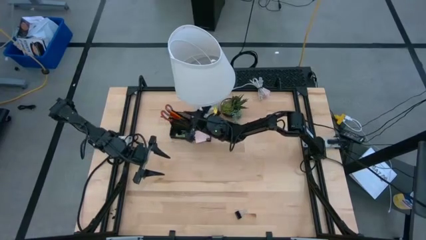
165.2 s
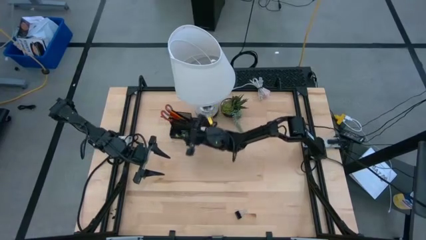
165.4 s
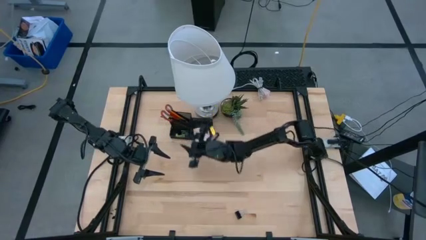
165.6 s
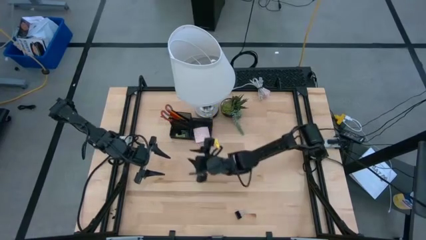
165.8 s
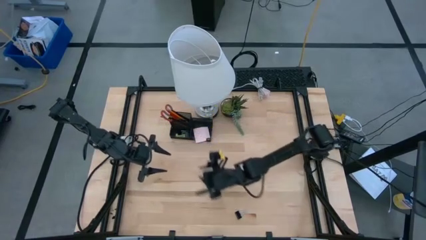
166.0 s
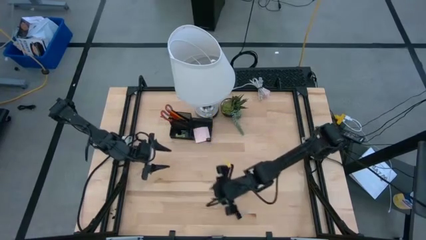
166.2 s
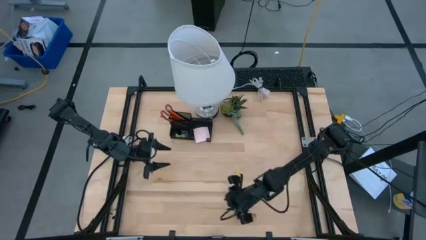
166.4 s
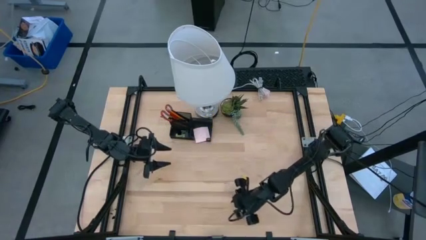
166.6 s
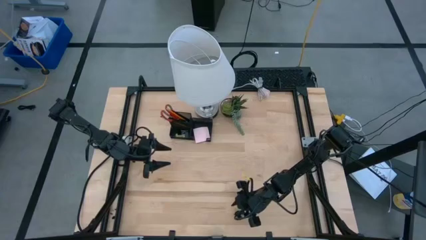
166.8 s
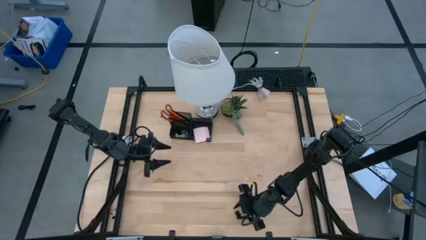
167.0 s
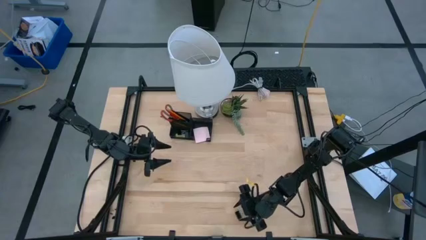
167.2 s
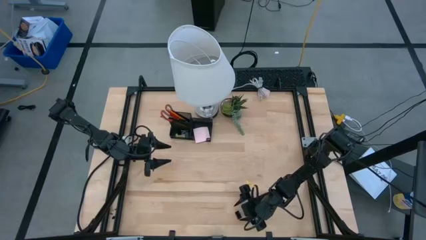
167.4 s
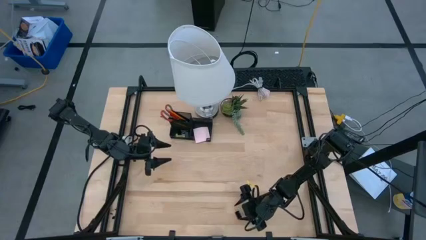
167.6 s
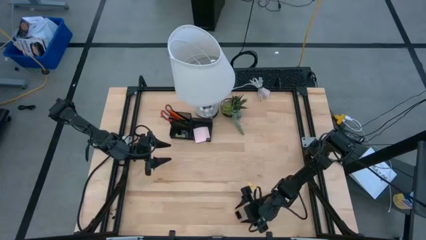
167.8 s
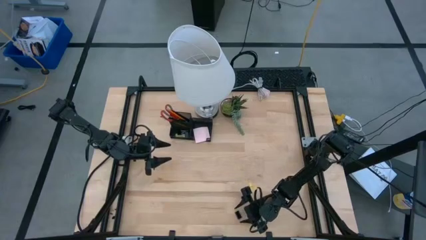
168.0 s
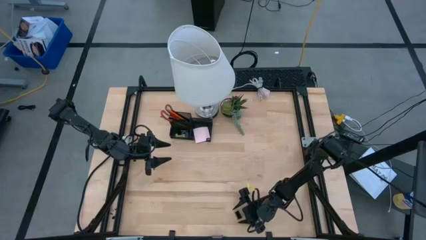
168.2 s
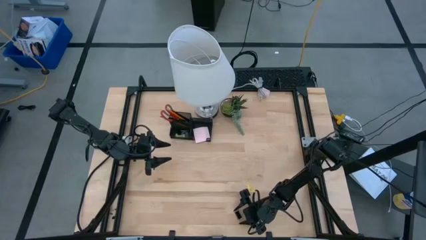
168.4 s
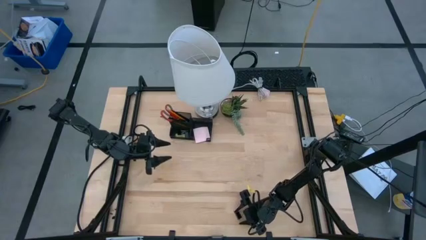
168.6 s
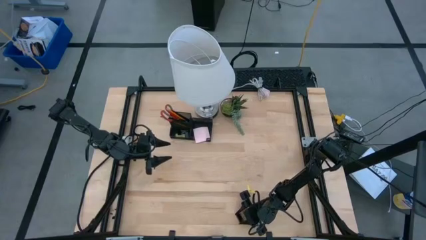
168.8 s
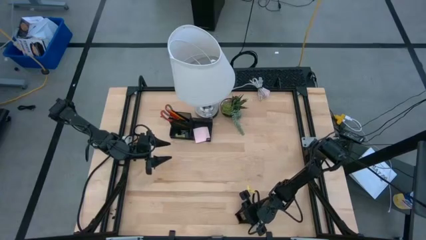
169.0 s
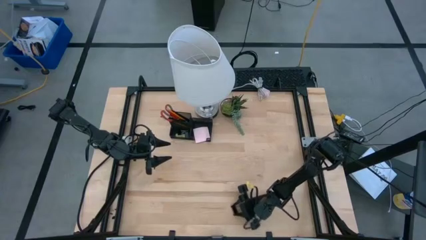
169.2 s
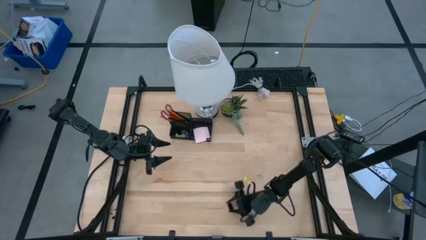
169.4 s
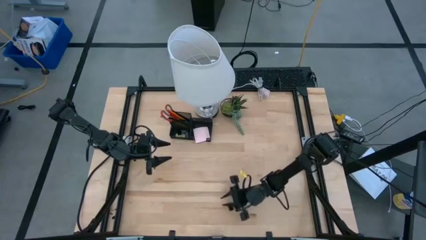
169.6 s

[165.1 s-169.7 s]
Task: Pick and place office supplies into organizer
Put the black binder clip into the black desk organizer

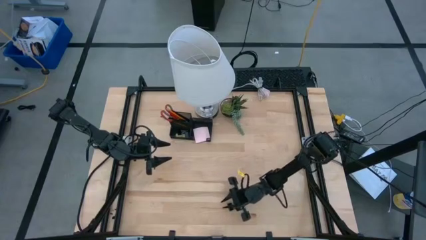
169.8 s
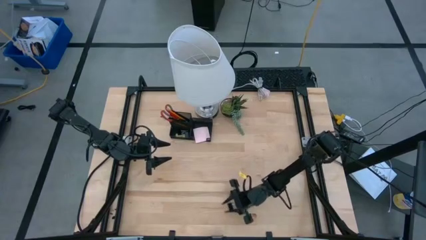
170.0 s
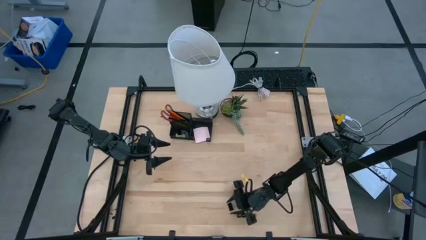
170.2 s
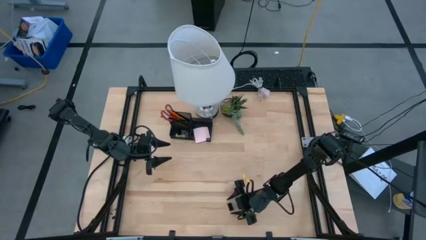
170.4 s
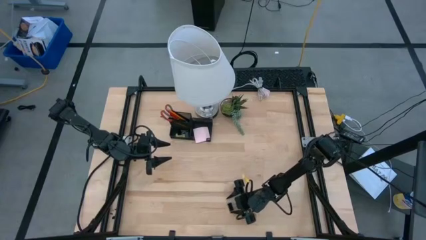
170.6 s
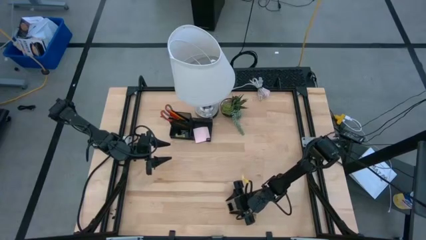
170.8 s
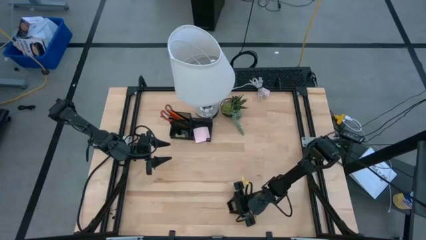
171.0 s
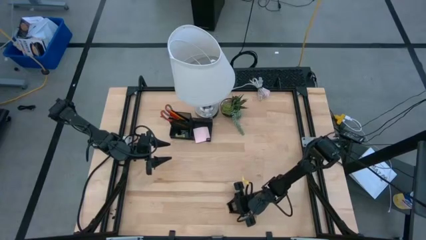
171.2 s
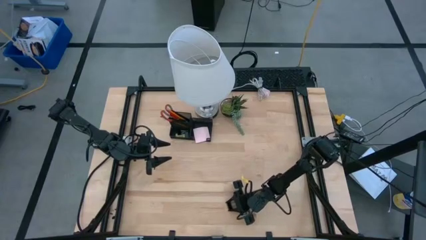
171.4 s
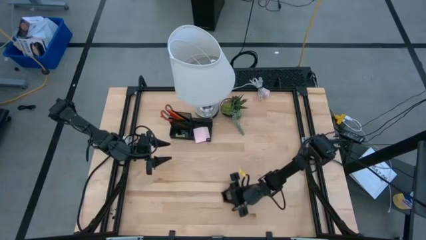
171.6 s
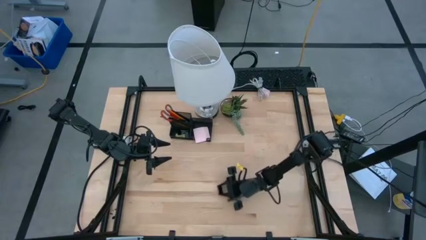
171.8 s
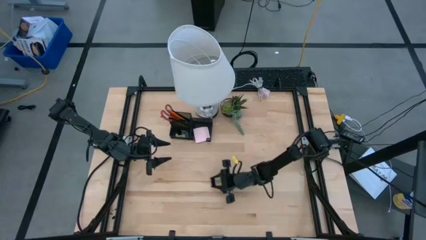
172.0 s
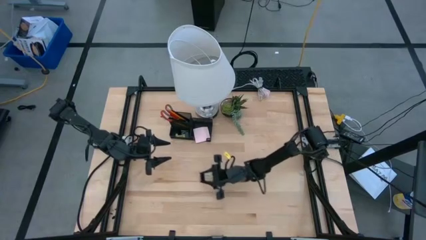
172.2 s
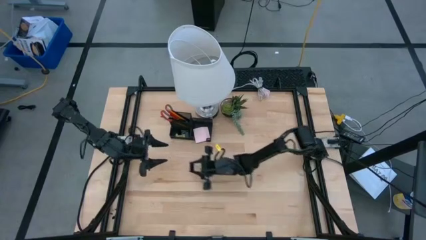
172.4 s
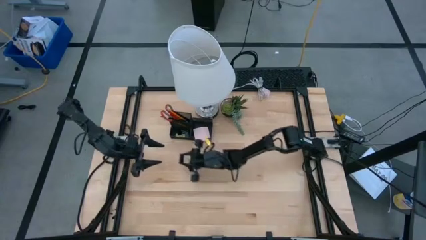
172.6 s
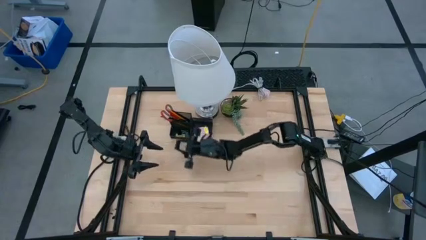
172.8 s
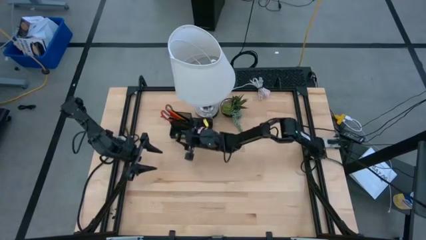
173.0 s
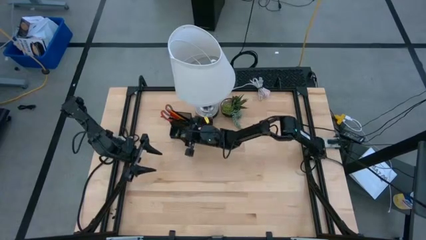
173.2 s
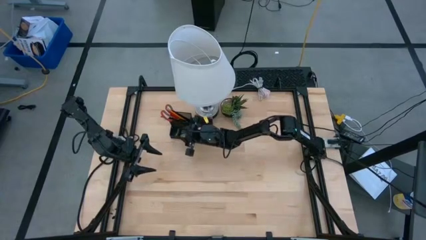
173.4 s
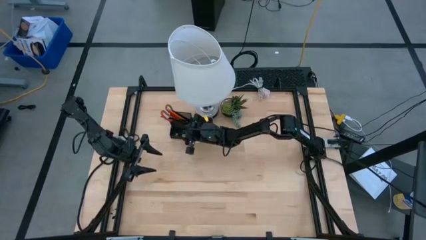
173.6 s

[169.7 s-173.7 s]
Put the black binder clip into the black desk organizer

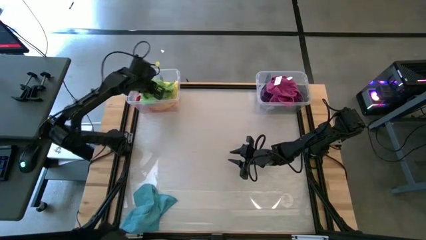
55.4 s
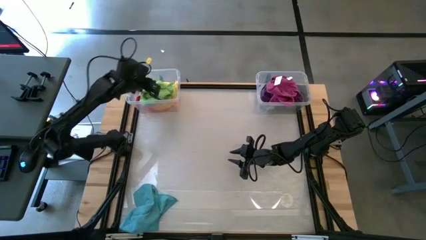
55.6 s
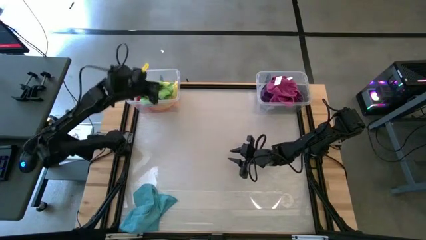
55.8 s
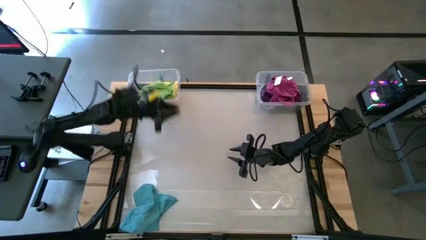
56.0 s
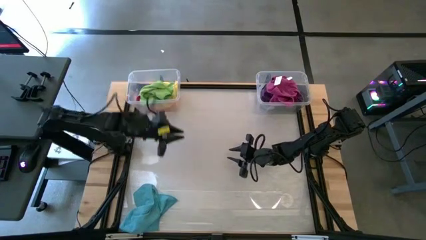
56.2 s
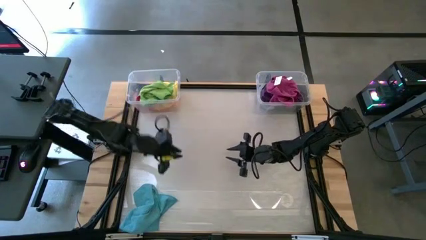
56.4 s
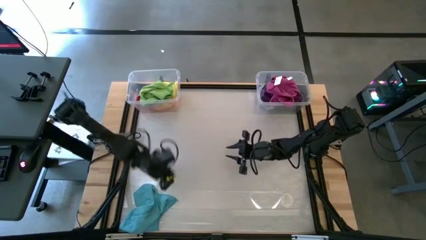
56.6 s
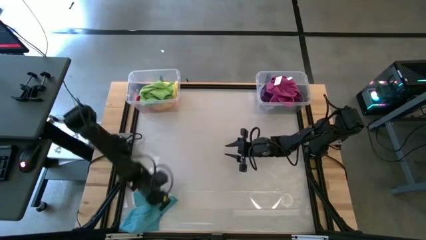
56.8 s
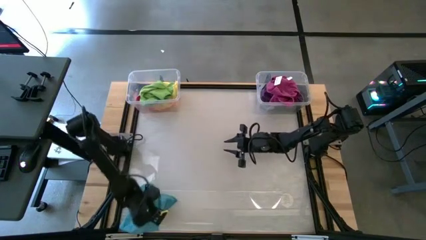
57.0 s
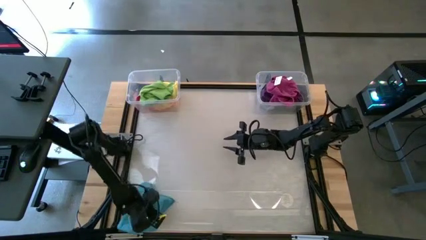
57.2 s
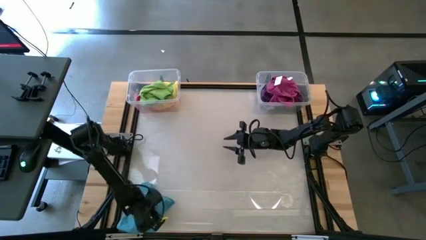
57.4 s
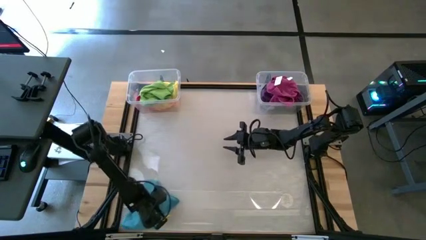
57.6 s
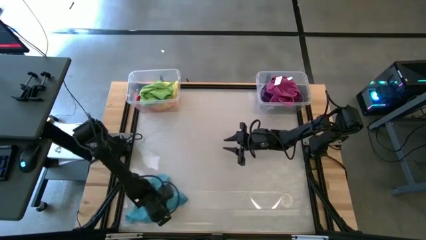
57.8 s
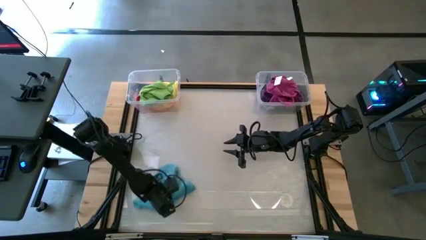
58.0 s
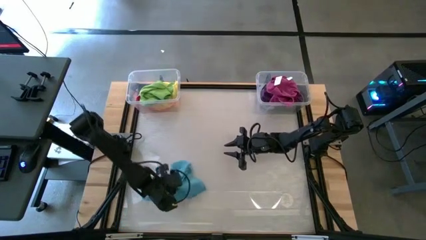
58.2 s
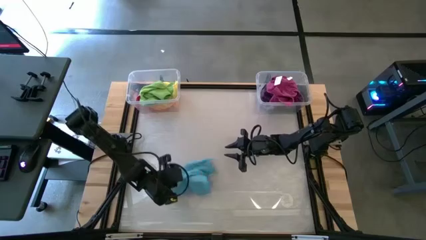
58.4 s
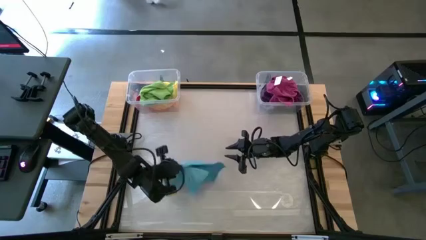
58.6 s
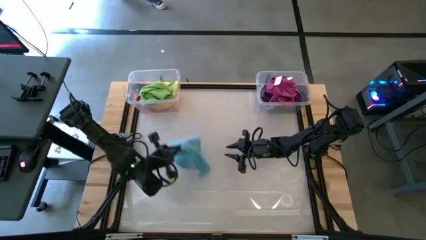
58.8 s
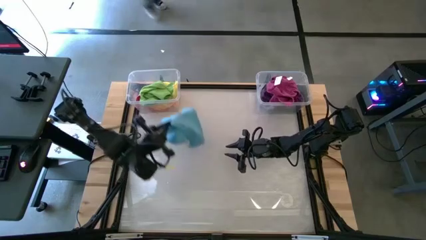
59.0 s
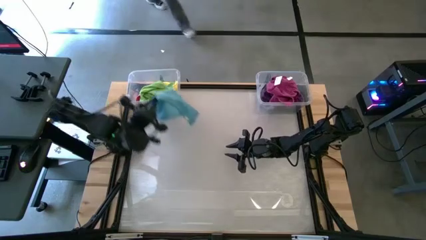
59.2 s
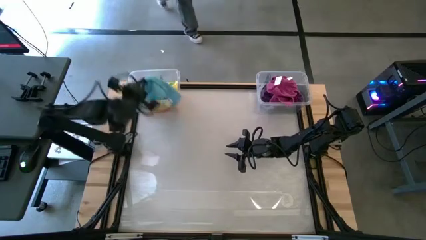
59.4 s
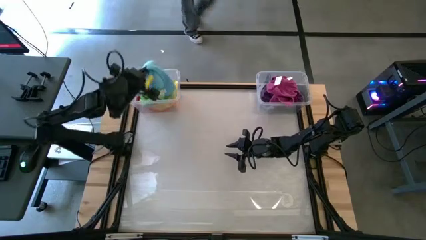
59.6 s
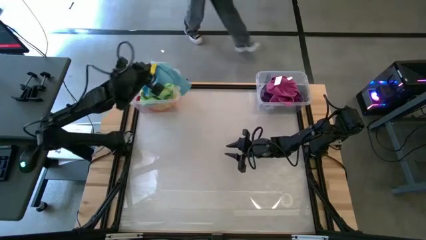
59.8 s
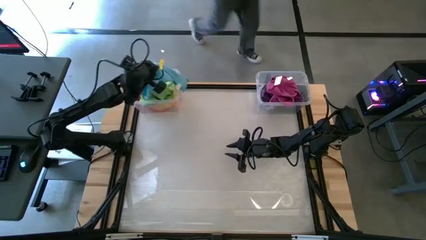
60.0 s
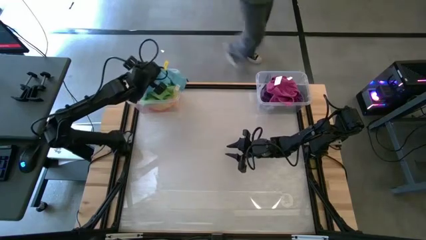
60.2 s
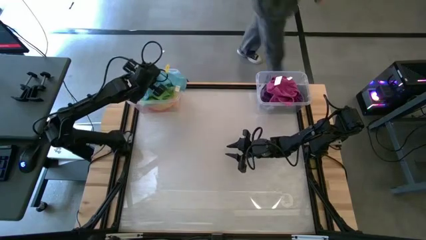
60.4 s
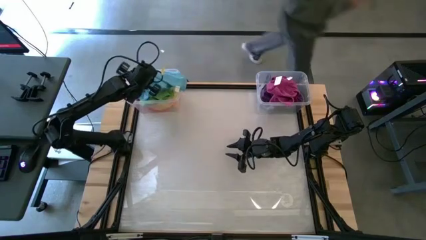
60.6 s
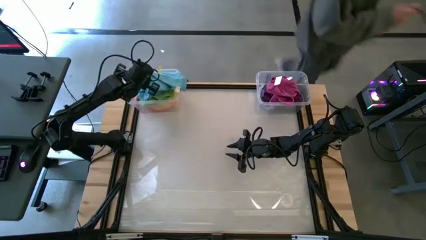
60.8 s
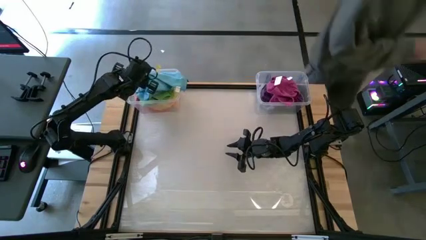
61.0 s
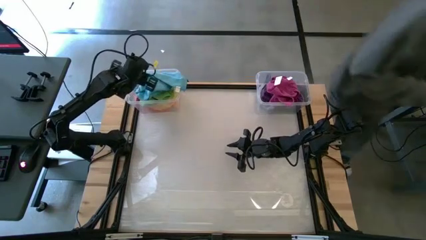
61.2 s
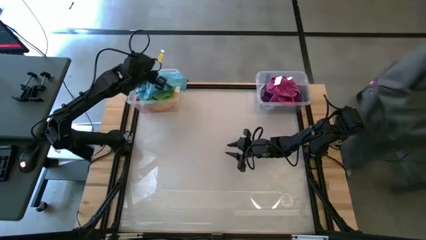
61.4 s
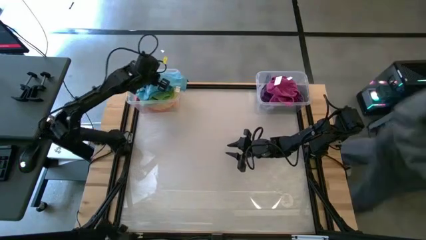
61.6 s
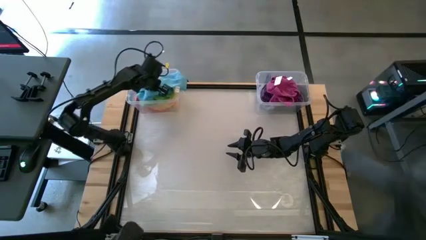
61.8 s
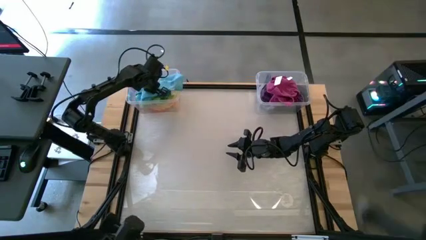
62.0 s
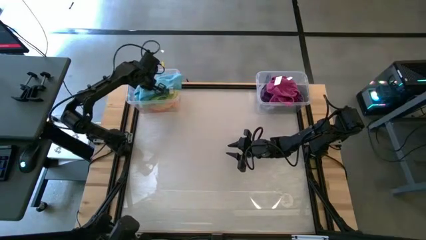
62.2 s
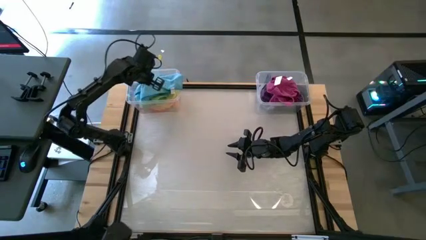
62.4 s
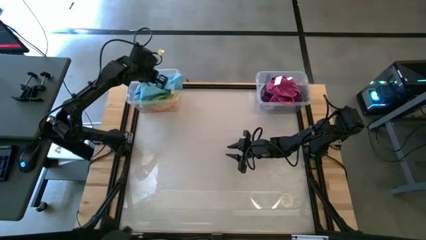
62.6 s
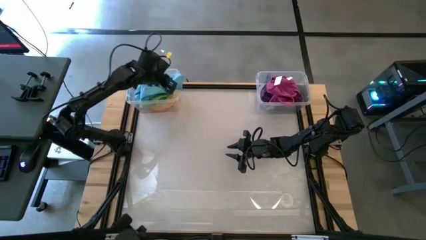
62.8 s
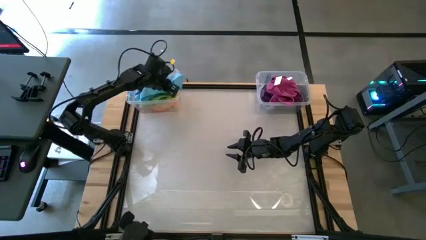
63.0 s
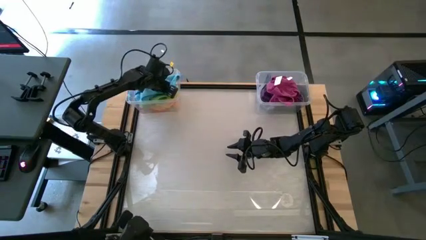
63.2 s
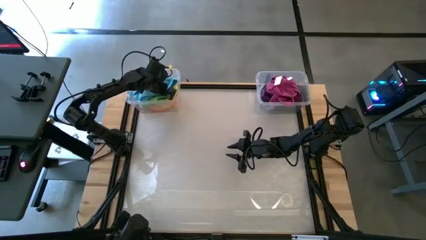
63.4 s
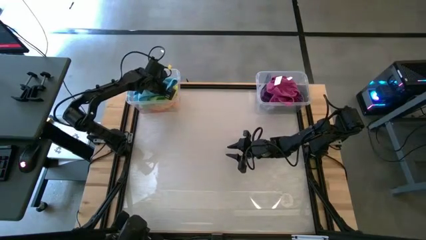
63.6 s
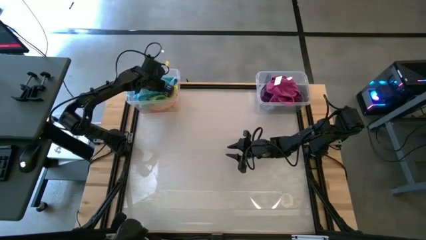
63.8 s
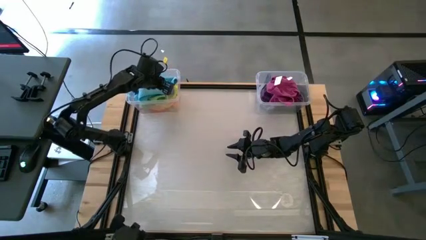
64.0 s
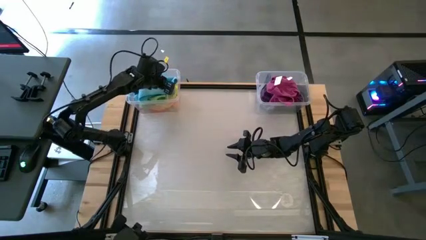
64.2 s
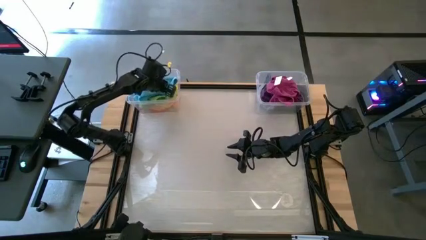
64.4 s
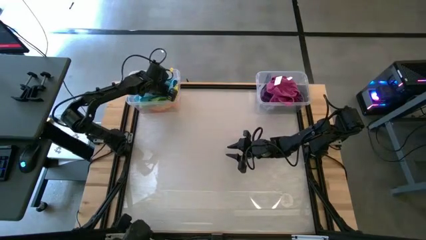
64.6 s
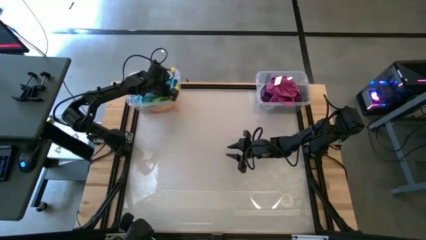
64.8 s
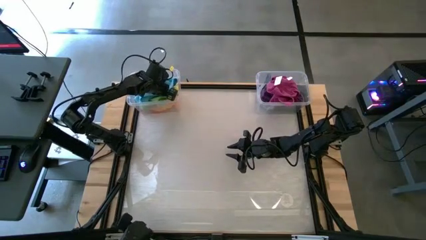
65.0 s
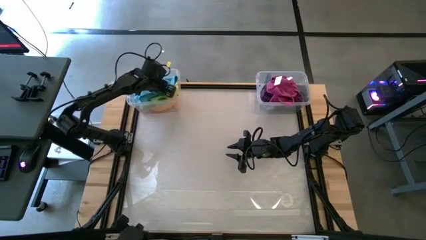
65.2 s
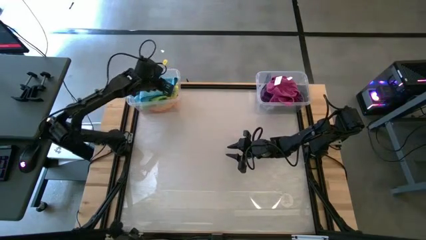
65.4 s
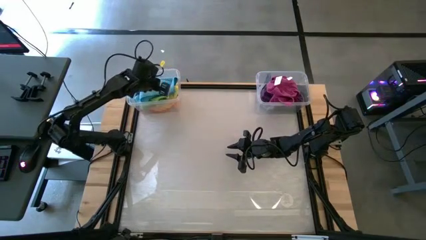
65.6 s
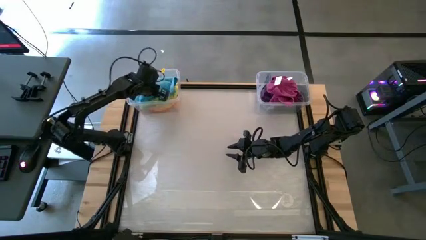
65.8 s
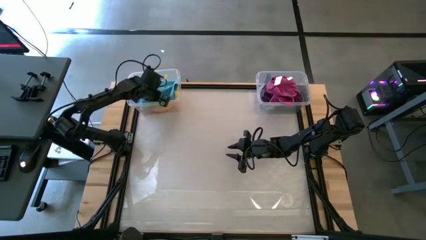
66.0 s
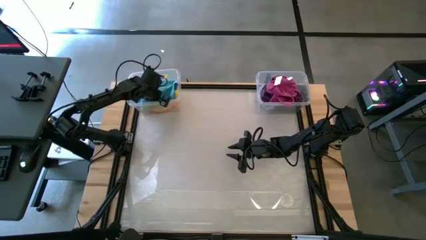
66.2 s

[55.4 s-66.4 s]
Task: Sort towels by color in basket
Put the blue microfiber towel into the left transparent bin
